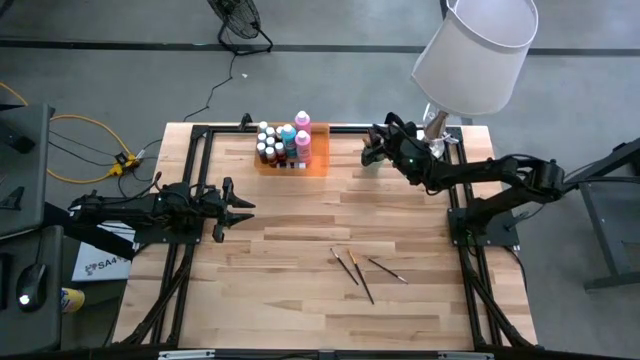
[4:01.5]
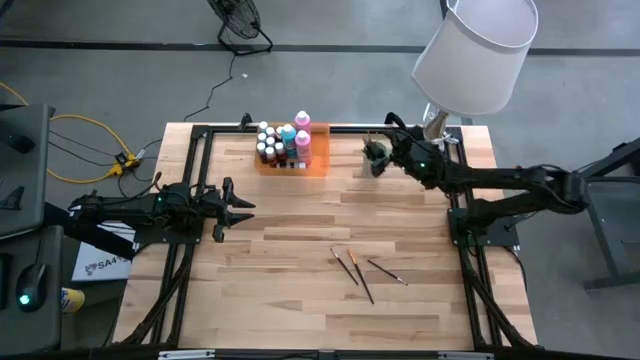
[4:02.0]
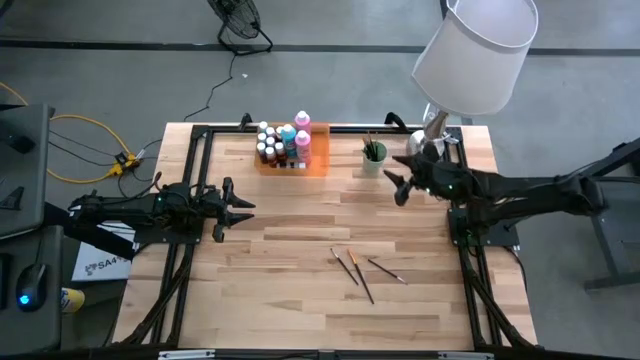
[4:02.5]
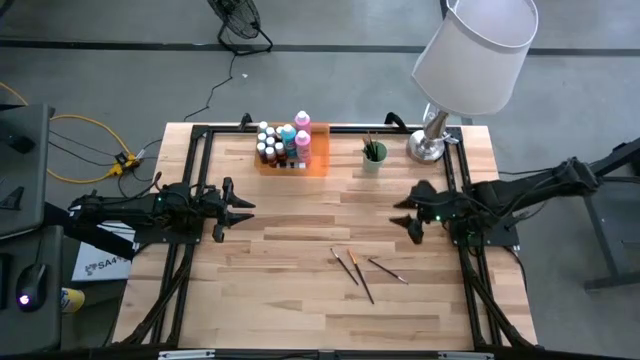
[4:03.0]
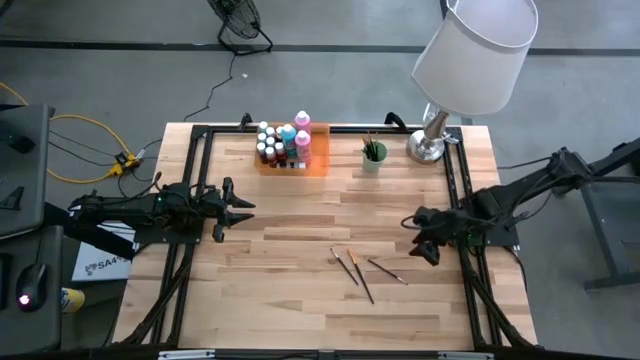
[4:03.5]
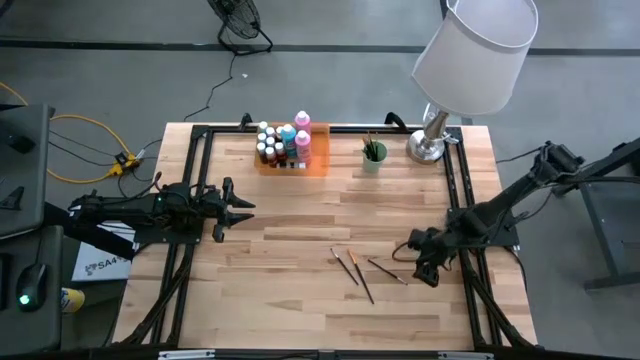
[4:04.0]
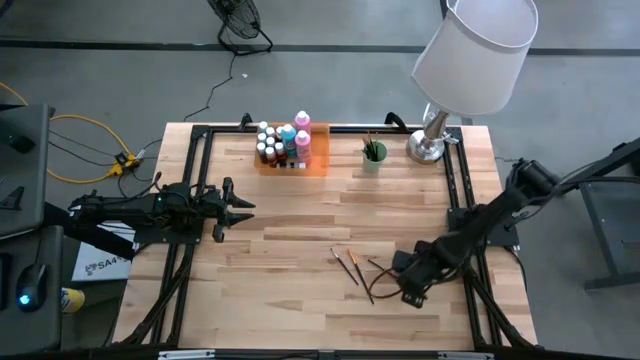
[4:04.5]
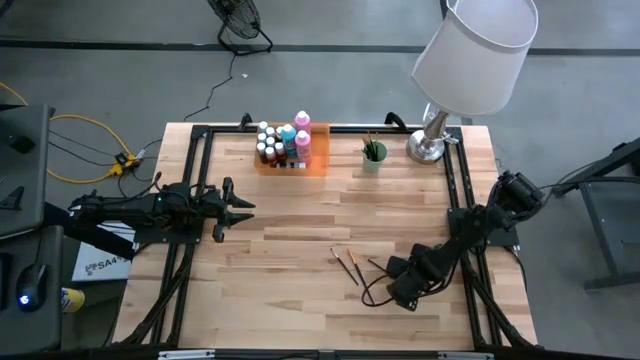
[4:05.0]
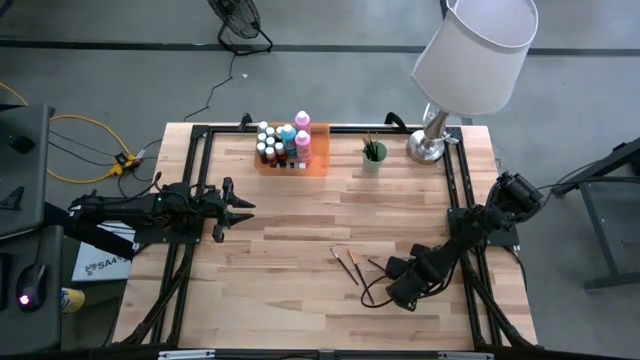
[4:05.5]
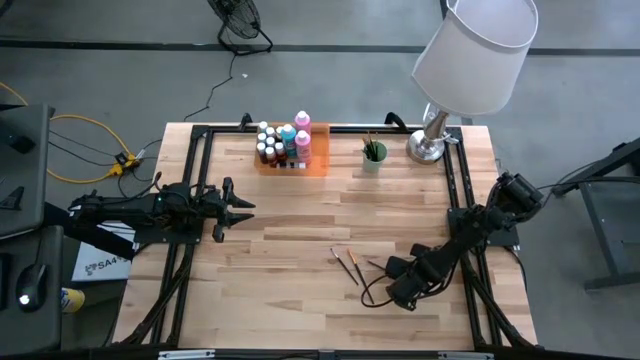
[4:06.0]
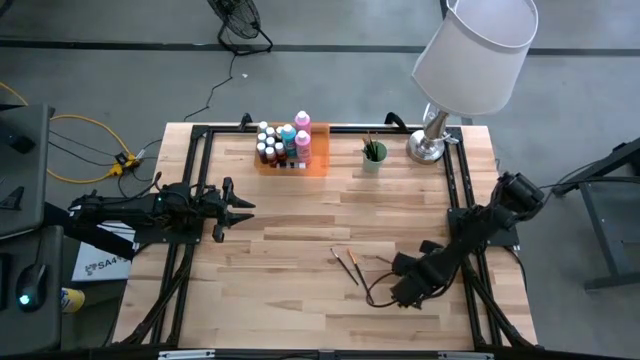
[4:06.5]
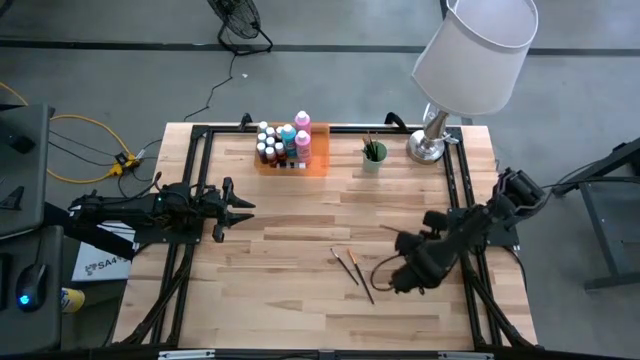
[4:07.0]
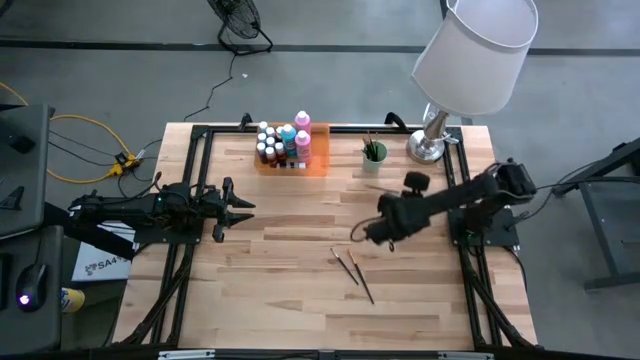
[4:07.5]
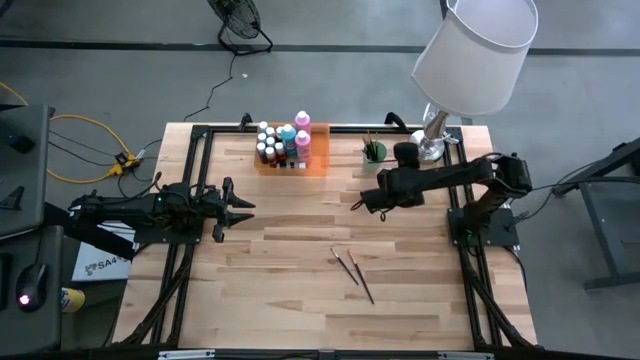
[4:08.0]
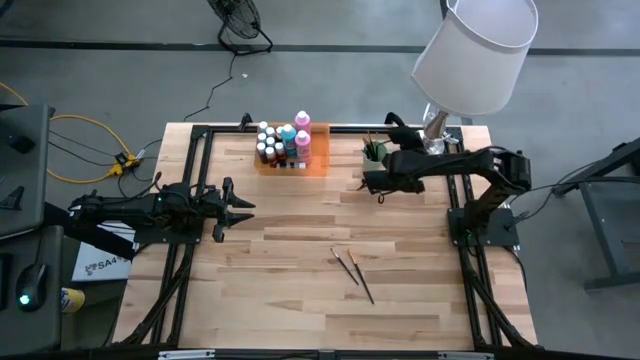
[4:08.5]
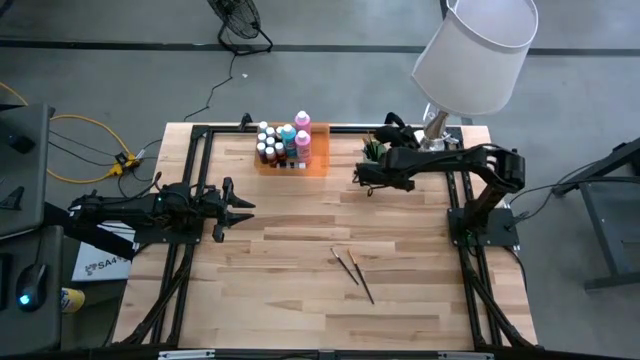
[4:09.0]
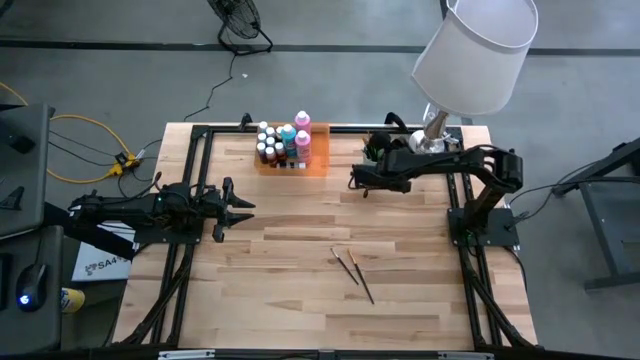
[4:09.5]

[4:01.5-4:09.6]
Task: Pick & Place Paint Supplies
Put the silver paint brush into the green cup

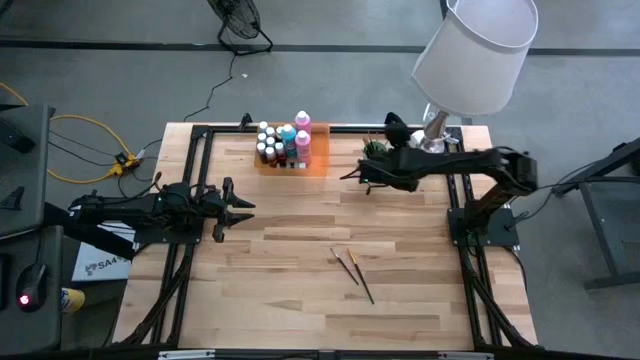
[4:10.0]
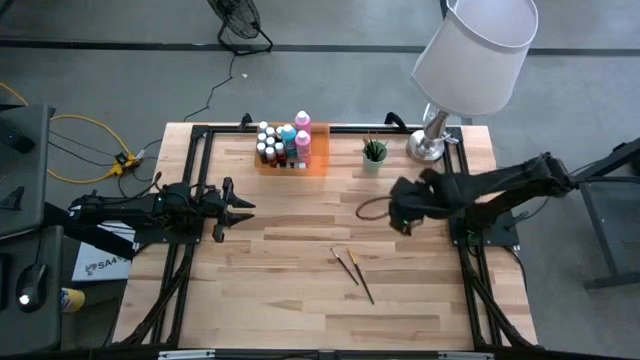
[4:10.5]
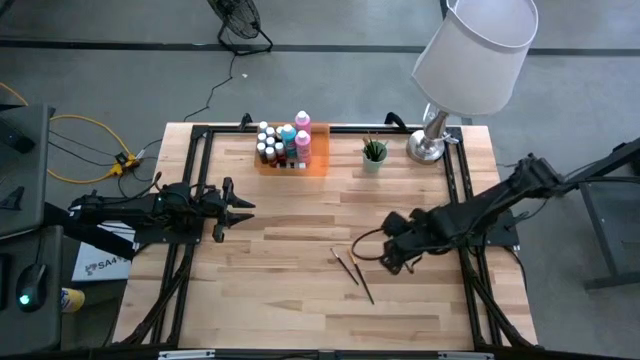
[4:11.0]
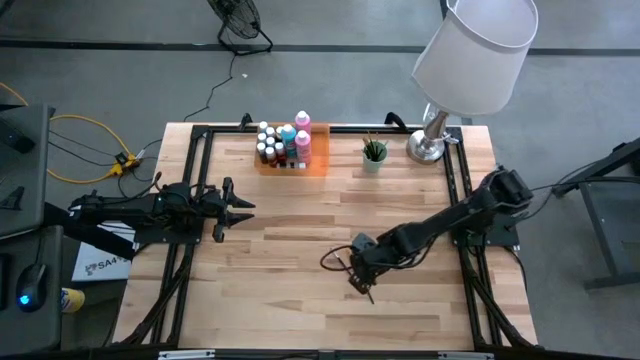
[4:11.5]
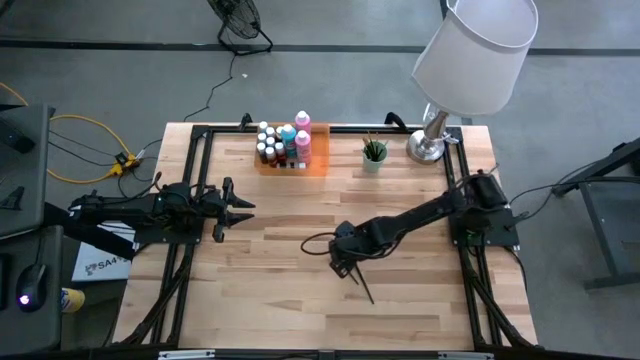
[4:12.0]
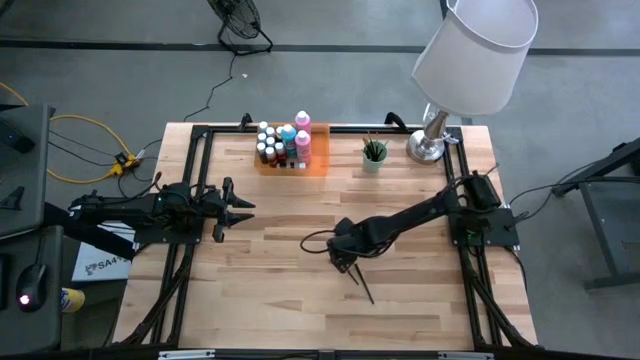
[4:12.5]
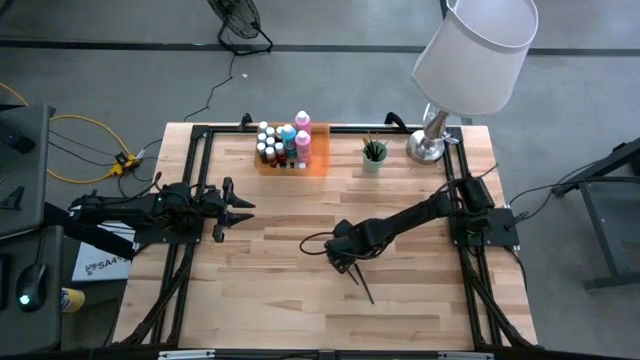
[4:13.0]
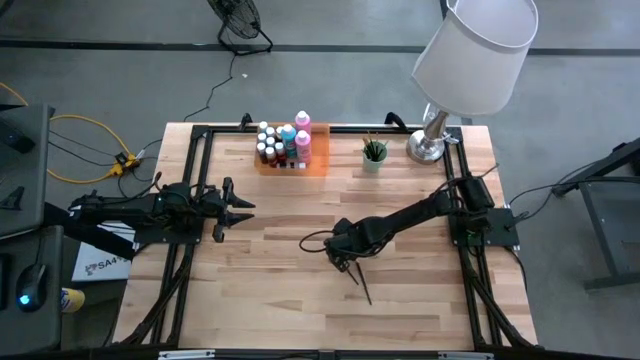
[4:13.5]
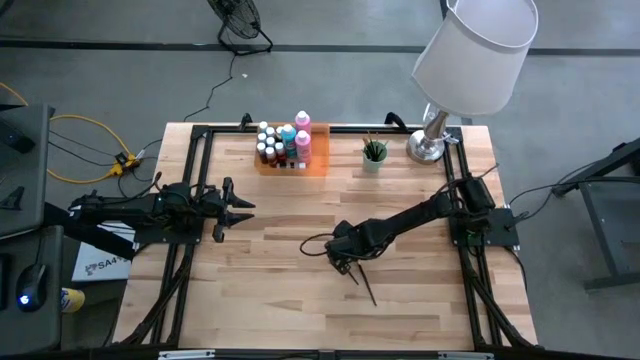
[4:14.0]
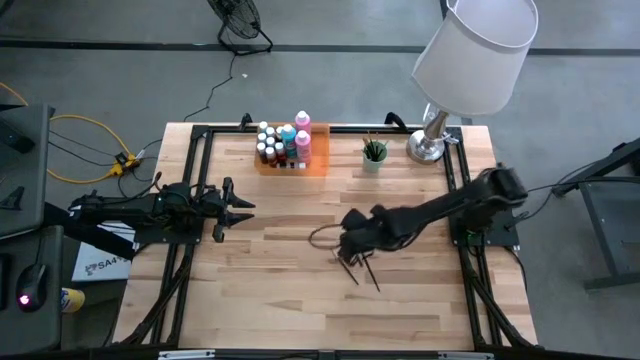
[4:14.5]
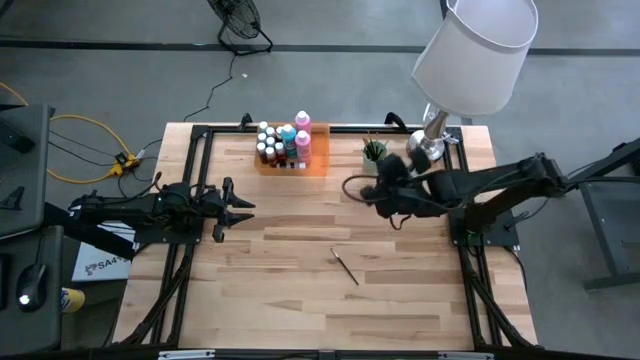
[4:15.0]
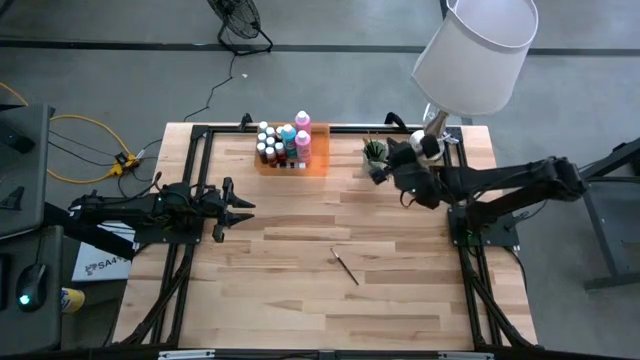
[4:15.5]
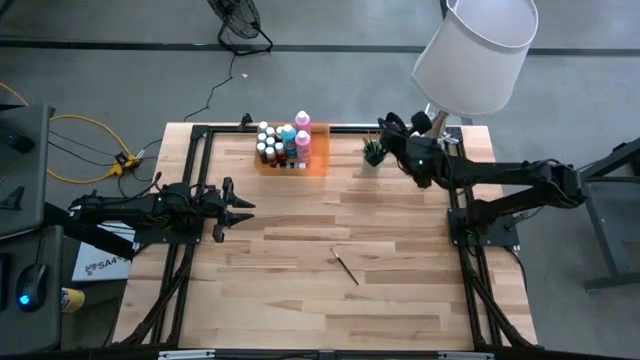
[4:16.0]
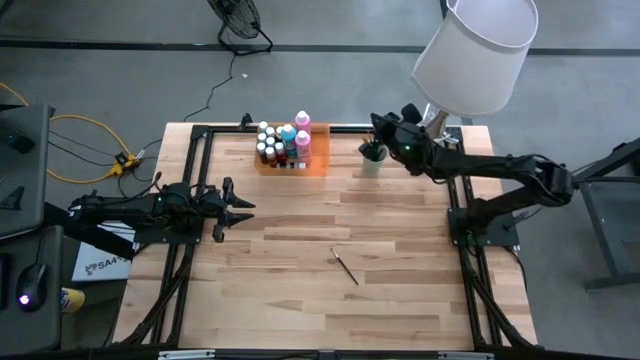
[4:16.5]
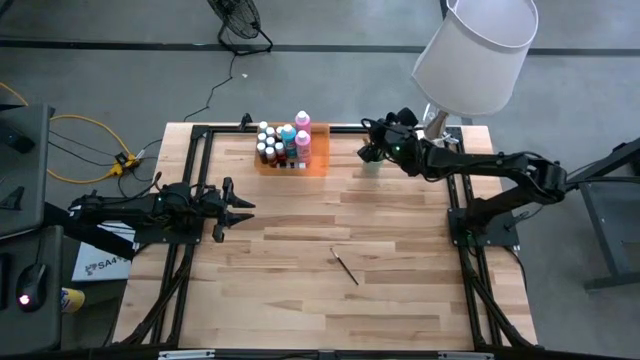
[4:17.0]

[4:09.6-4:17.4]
Put the gold paint brush into the green cup

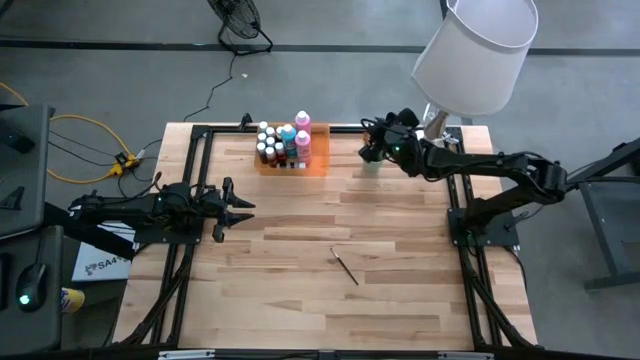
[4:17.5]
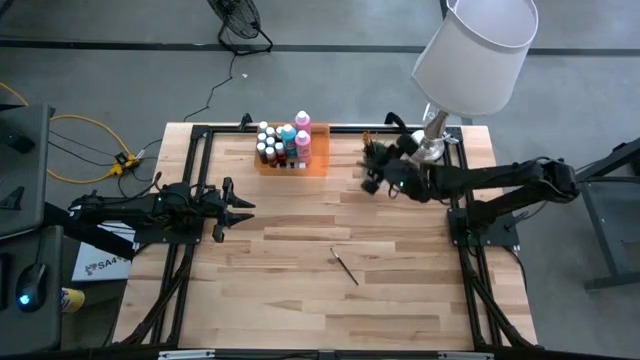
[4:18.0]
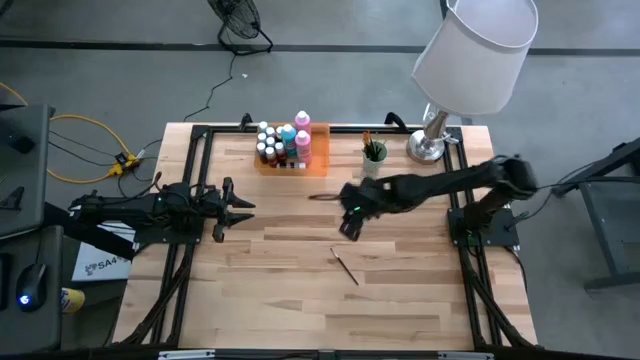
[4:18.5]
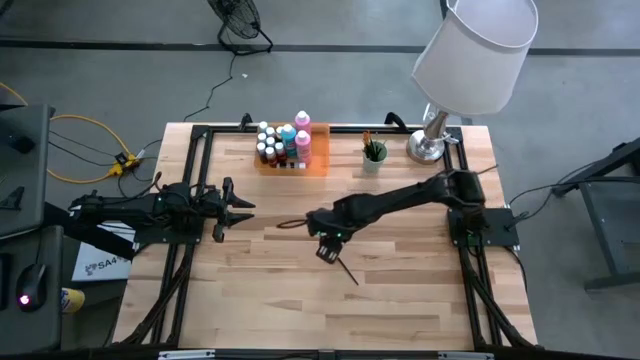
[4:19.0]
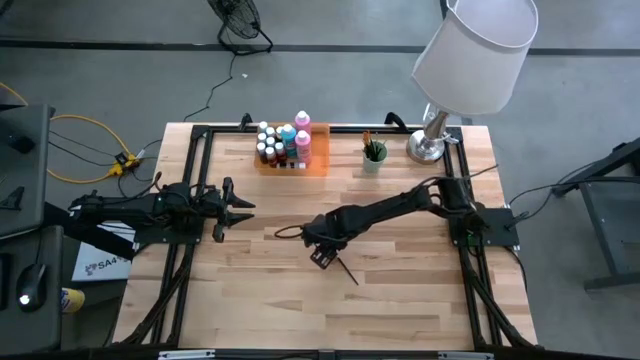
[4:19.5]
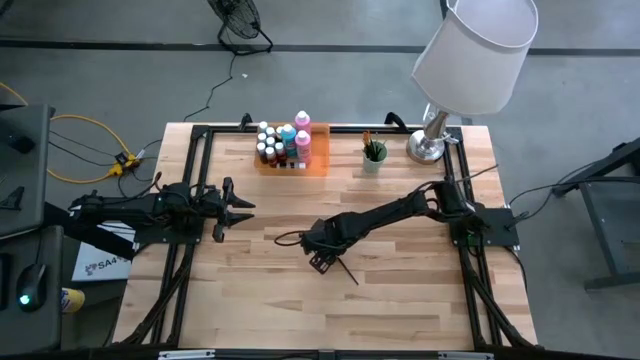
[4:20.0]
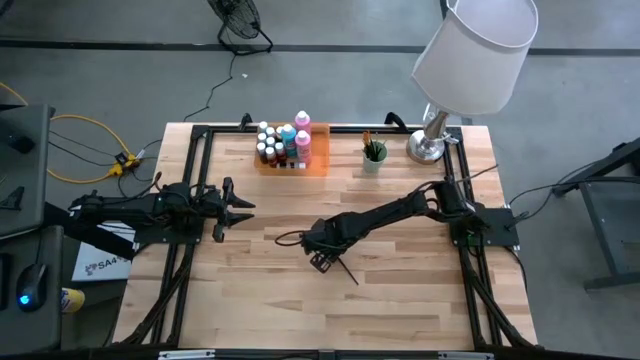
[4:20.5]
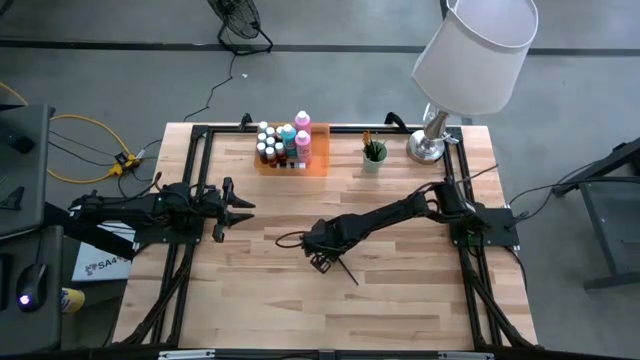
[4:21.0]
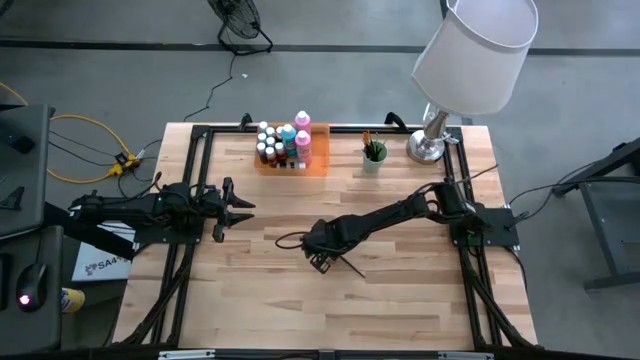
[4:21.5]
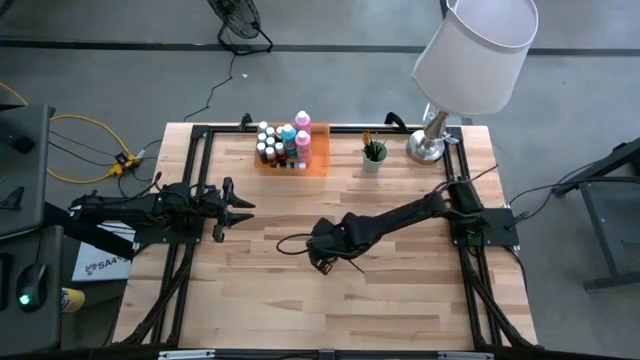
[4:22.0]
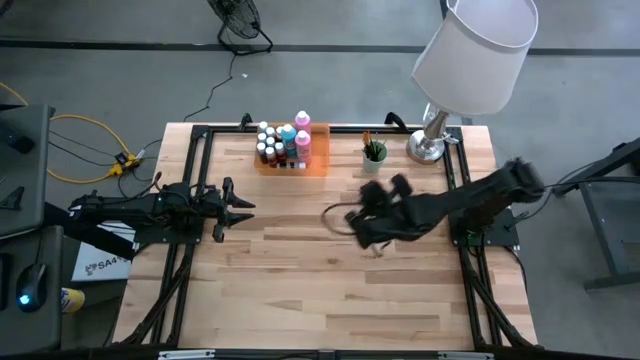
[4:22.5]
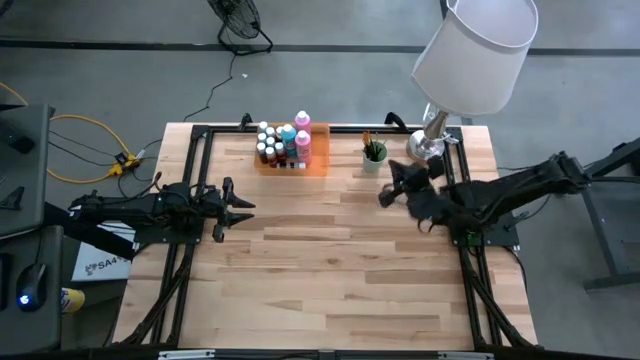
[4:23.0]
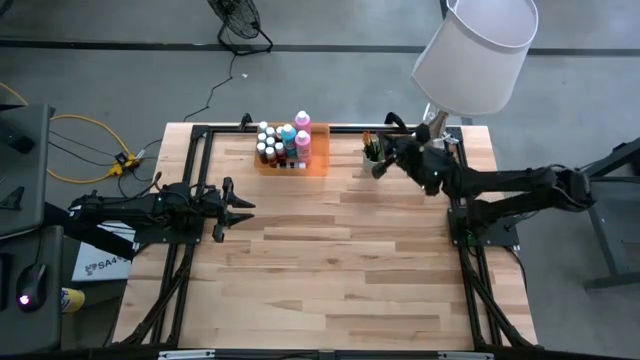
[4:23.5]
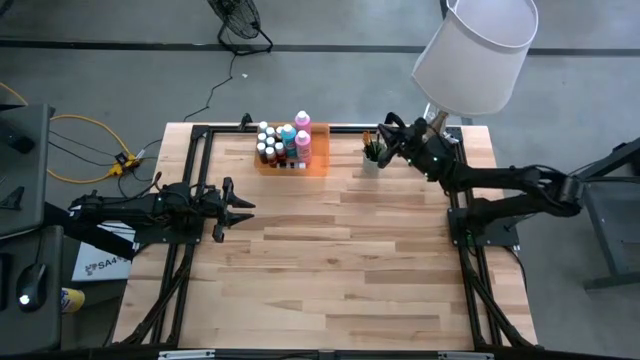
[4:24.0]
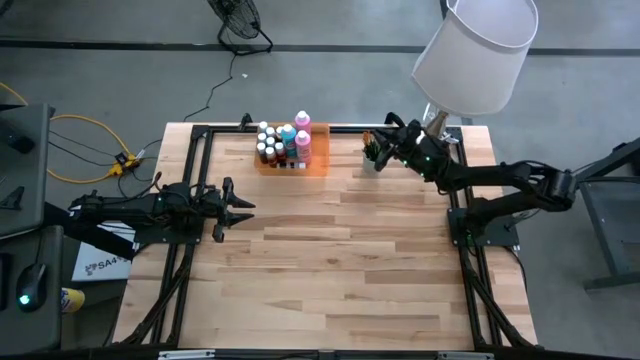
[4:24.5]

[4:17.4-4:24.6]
Put the silver paint brush into the green cup
